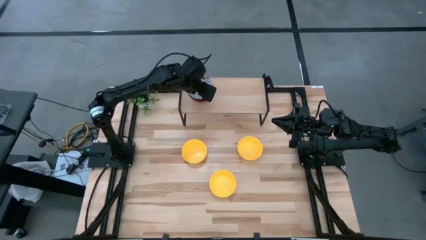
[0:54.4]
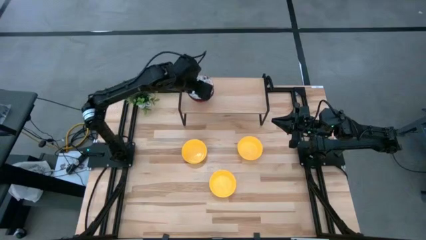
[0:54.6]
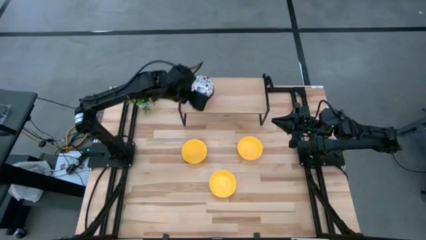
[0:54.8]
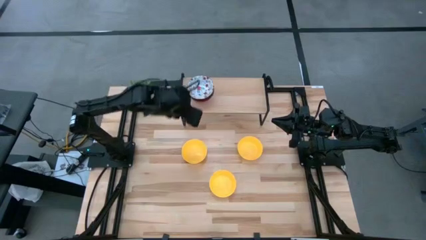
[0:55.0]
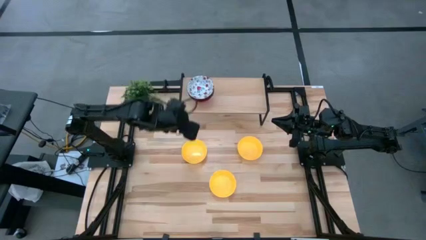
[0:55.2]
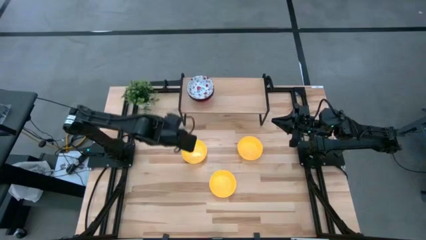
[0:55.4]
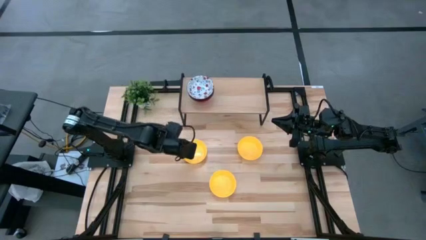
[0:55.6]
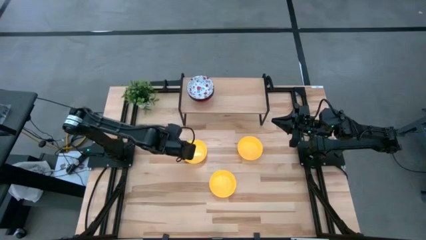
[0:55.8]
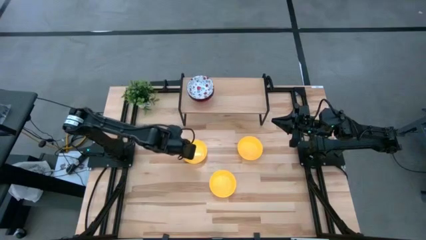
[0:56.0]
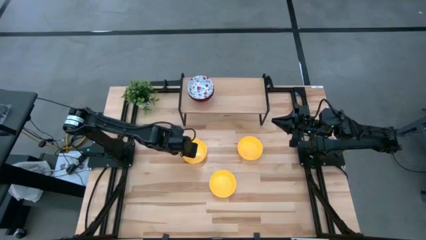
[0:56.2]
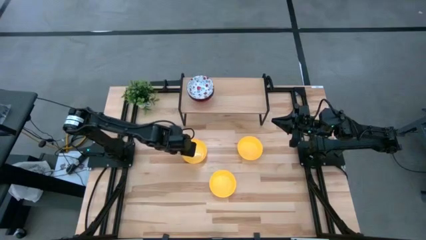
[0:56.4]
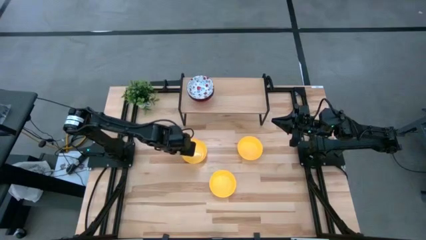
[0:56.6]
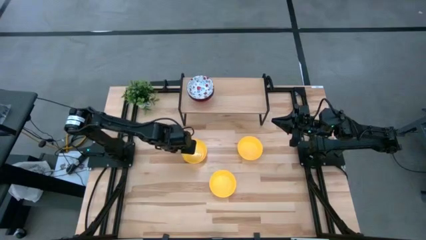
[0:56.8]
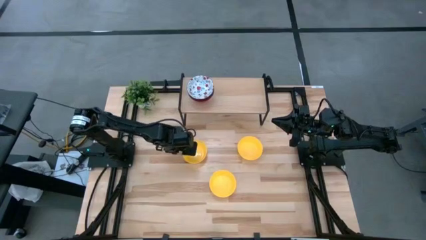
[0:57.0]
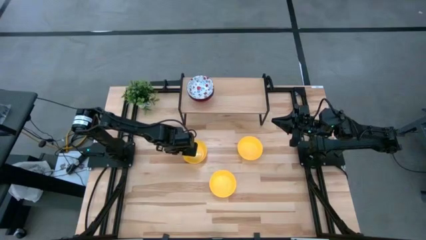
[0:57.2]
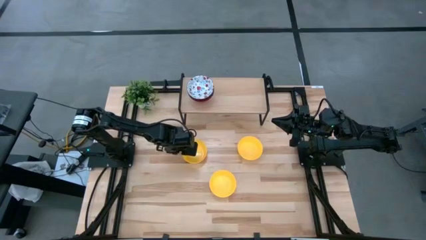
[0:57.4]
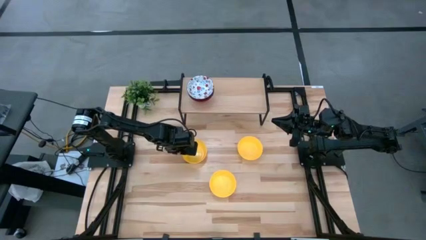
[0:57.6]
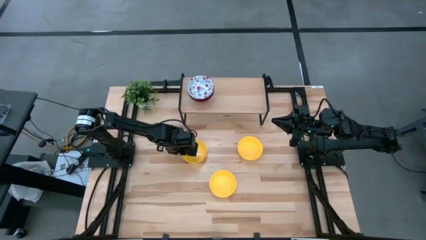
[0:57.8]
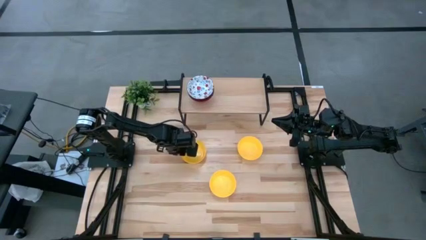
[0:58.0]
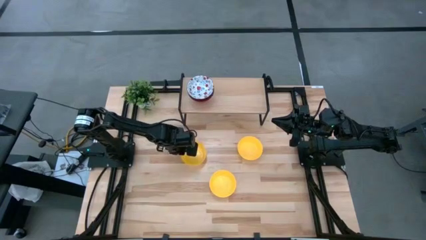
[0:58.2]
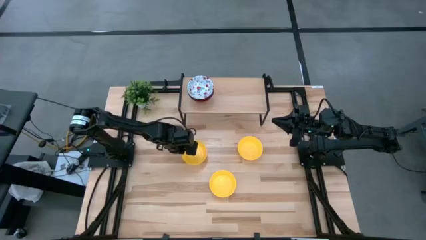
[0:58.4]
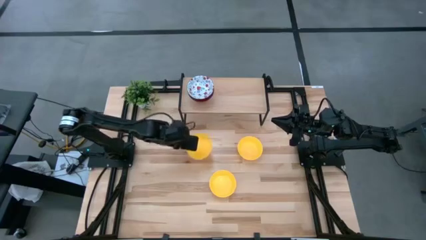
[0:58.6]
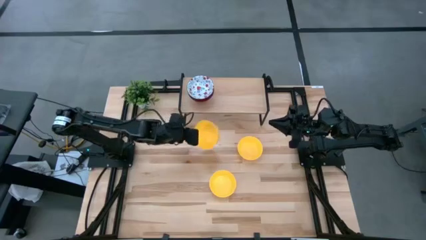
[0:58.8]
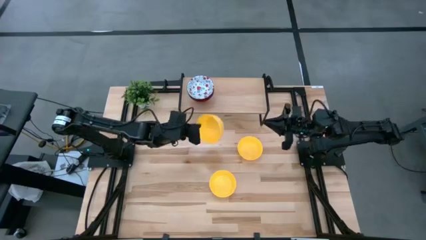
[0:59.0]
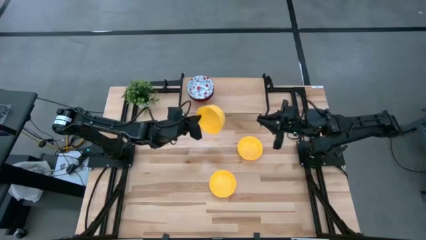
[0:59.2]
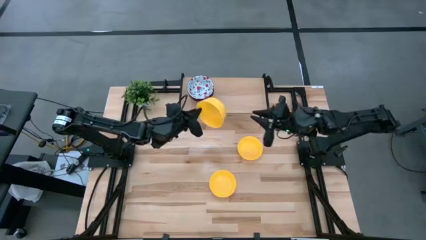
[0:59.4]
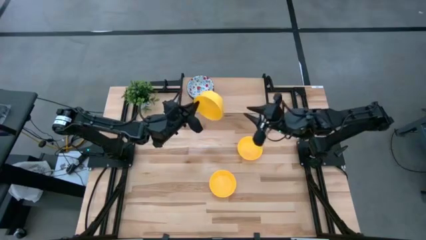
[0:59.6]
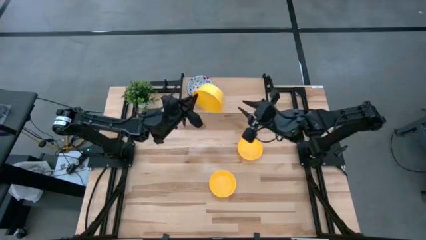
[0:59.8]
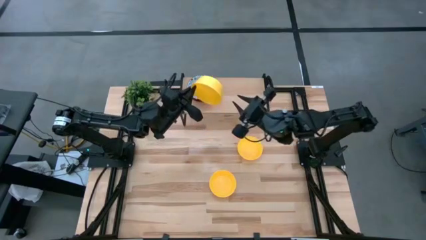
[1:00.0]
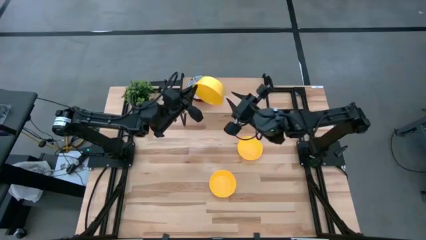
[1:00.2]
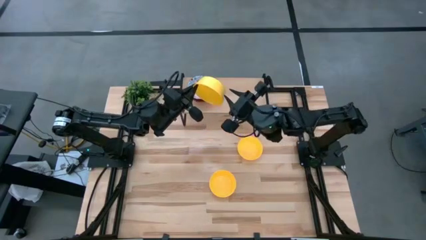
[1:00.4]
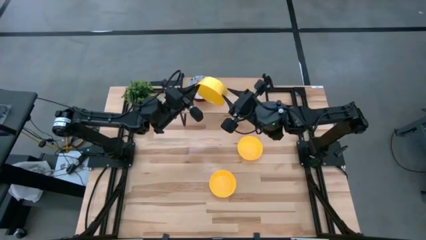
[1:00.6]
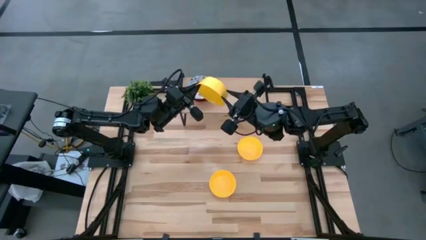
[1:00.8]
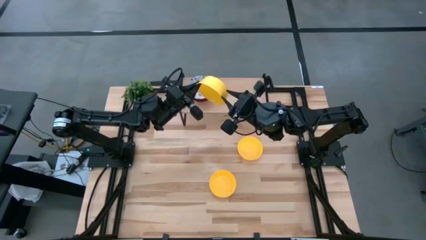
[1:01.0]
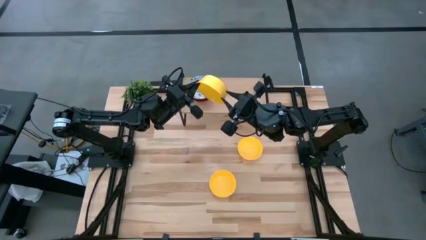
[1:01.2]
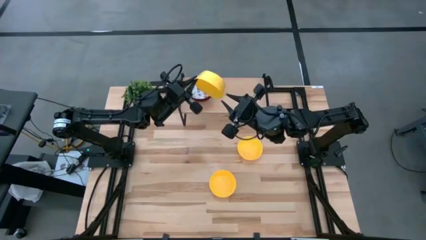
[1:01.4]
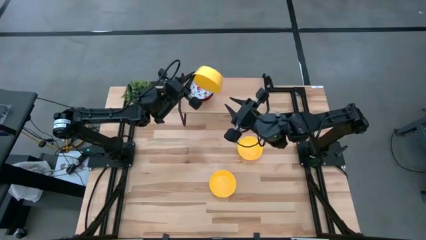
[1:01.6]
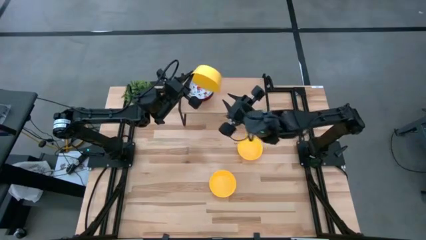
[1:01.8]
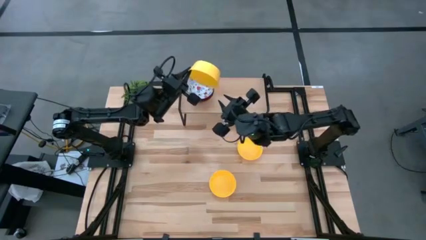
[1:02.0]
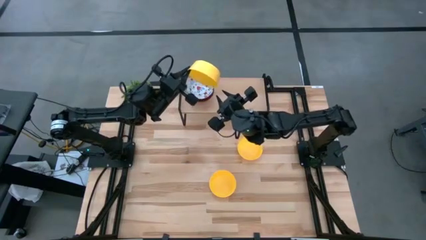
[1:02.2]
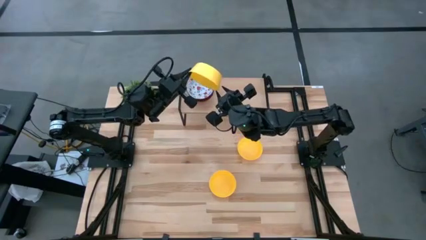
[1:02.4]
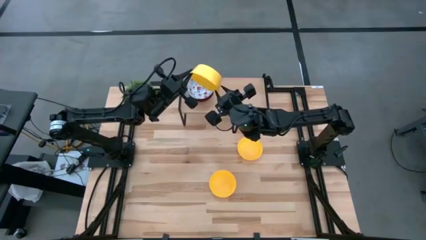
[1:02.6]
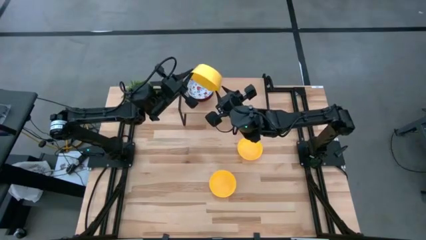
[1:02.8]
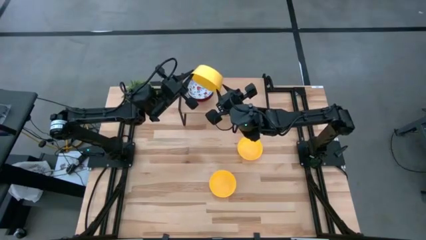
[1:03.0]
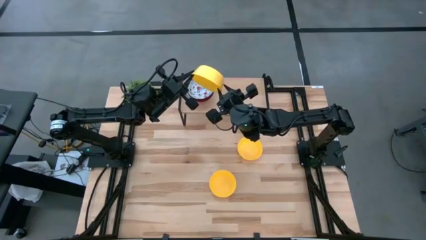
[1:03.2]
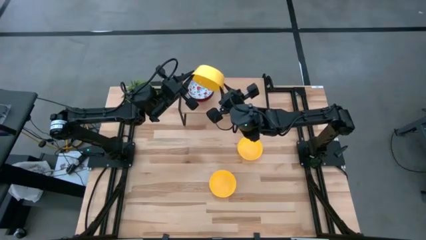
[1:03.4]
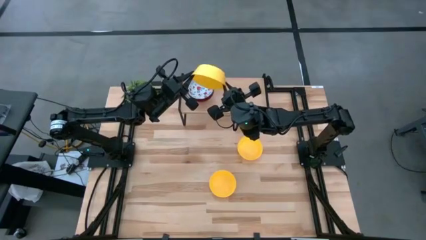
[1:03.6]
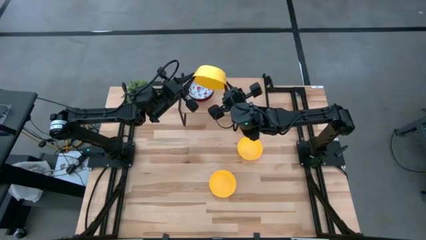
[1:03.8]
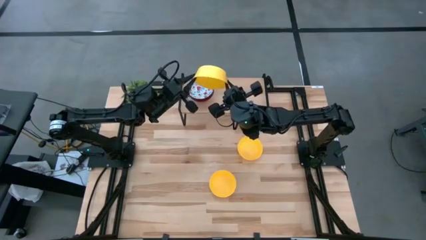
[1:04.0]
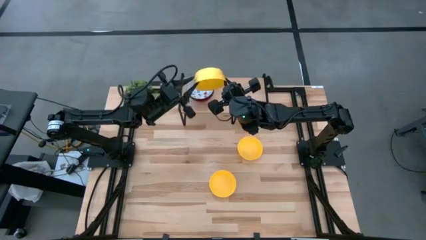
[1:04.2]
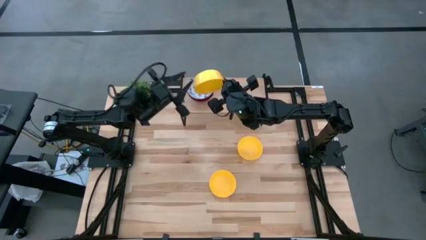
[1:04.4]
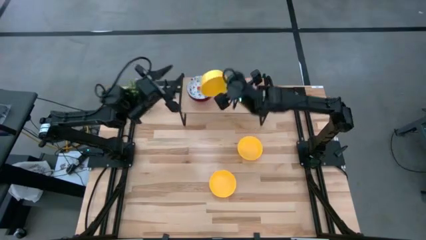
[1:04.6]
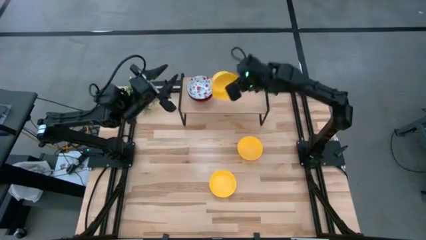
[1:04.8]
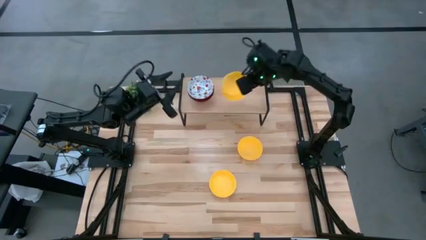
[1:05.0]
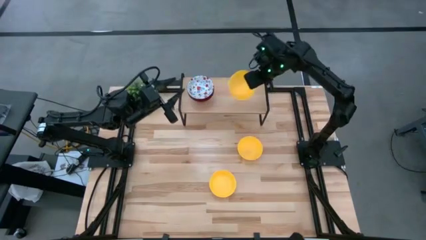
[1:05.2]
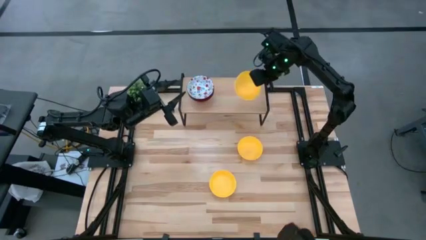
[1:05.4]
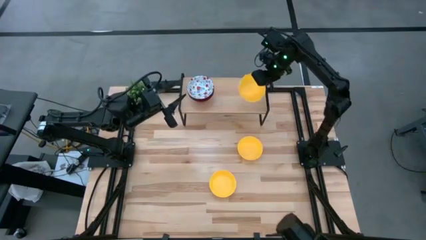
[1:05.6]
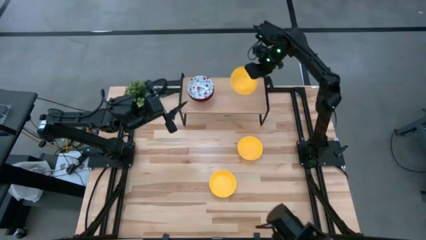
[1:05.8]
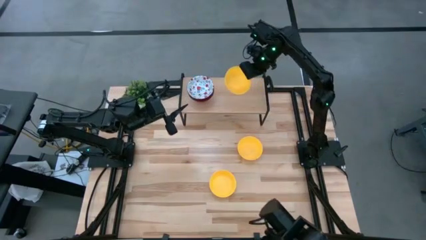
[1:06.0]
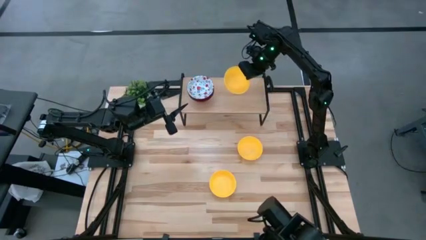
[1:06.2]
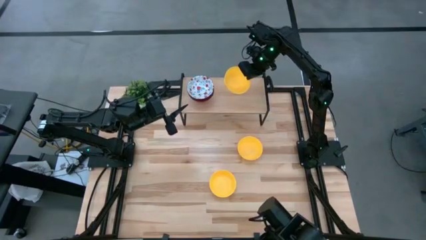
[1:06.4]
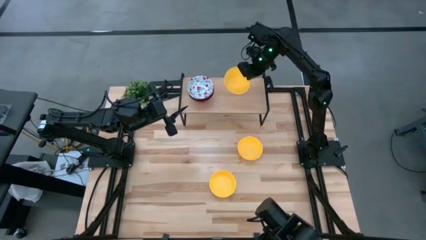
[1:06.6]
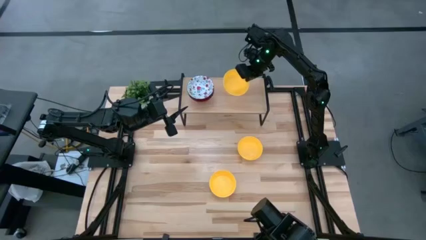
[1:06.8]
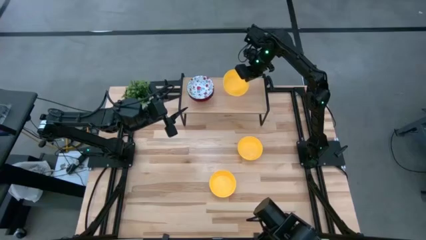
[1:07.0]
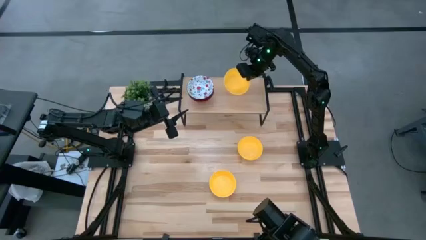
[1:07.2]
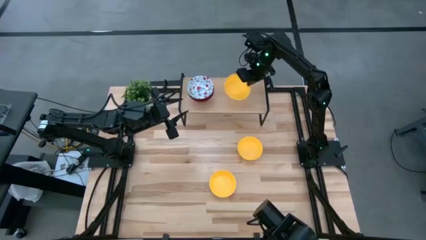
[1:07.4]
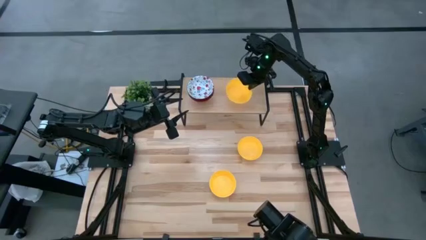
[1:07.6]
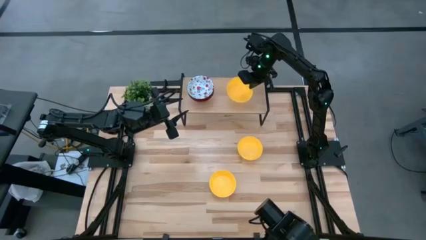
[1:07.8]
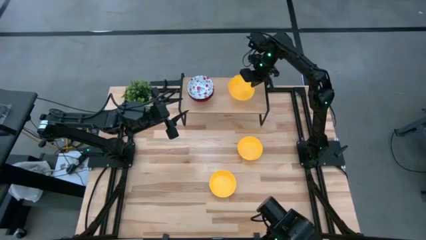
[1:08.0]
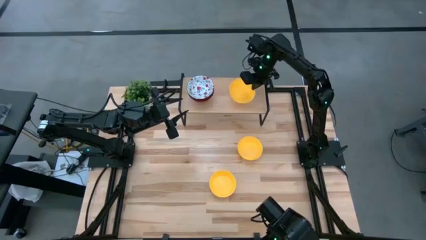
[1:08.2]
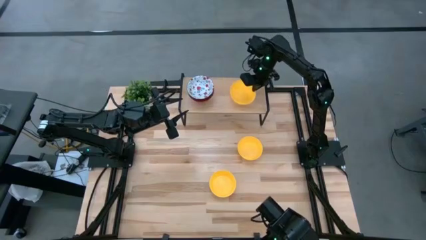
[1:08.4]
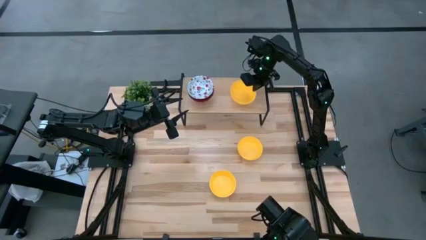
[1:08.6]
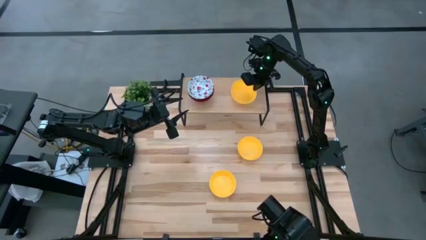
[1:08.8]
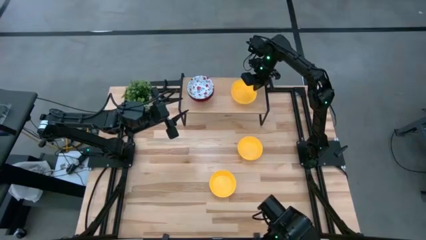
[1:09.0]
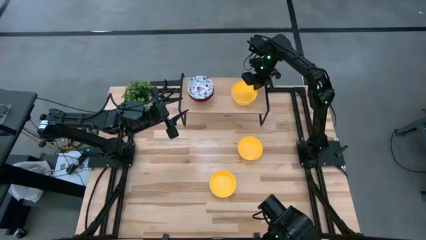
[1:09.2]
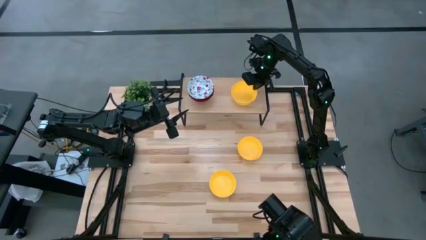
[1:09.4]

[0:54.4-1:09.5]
Task: Pick & Place Mini bowls
Put the left yellow bowl on the shelf
